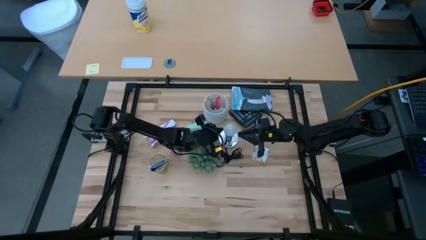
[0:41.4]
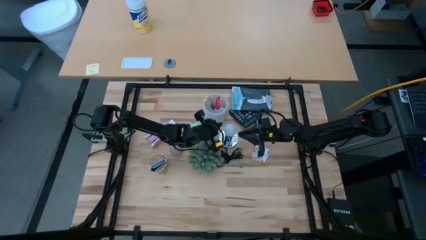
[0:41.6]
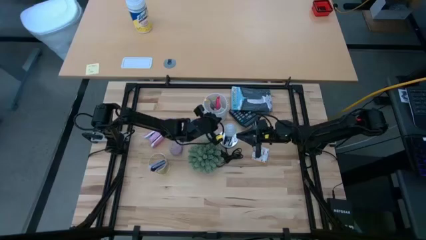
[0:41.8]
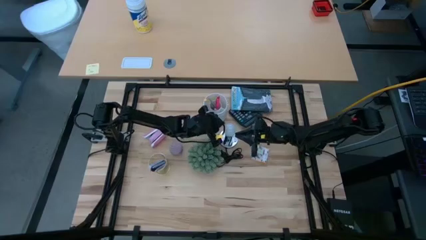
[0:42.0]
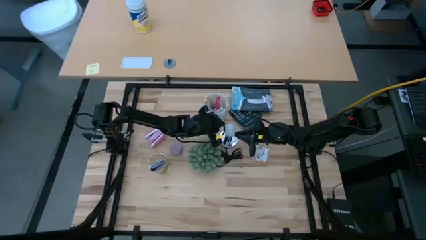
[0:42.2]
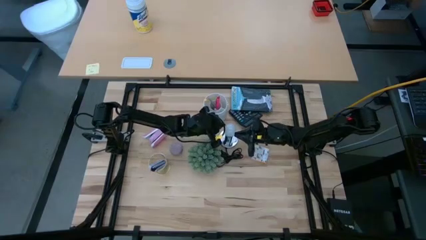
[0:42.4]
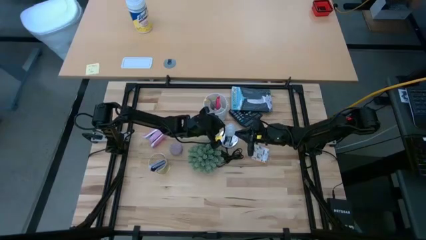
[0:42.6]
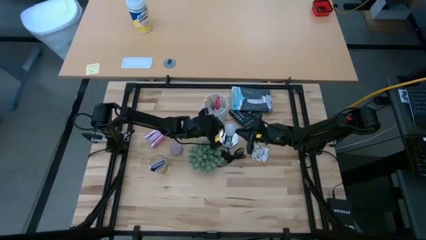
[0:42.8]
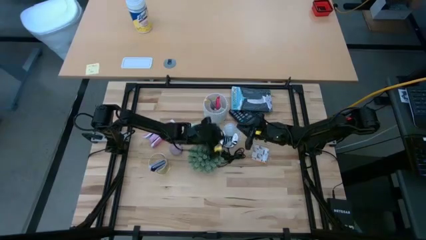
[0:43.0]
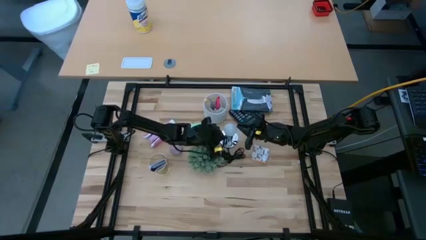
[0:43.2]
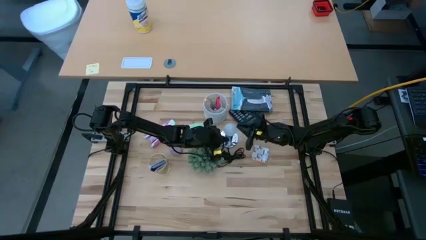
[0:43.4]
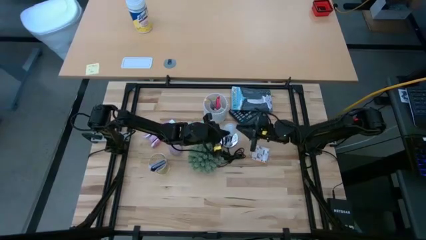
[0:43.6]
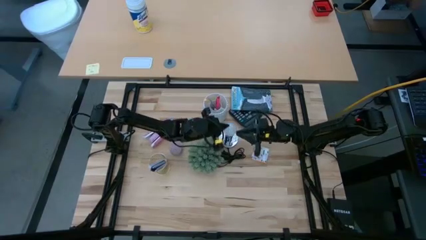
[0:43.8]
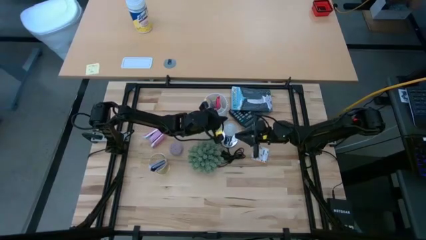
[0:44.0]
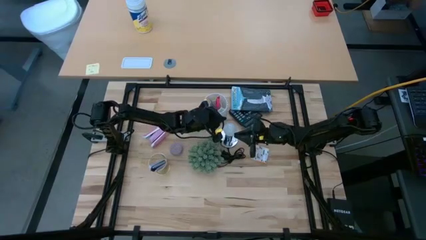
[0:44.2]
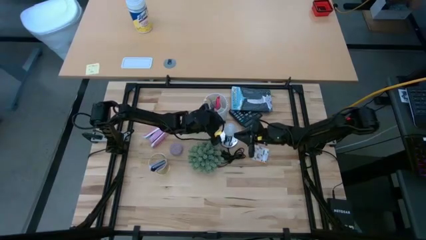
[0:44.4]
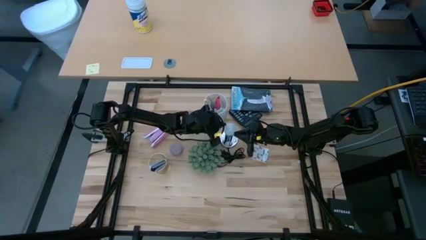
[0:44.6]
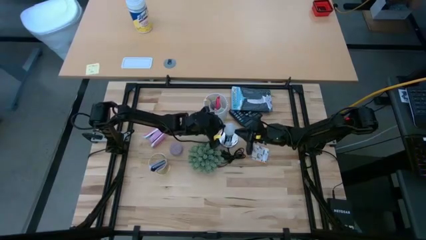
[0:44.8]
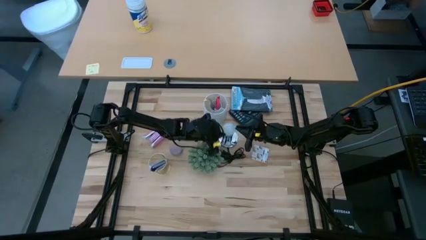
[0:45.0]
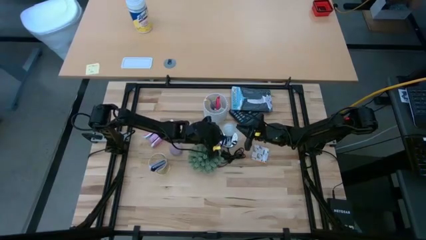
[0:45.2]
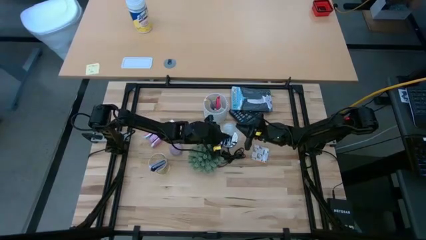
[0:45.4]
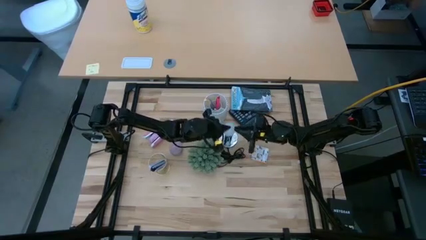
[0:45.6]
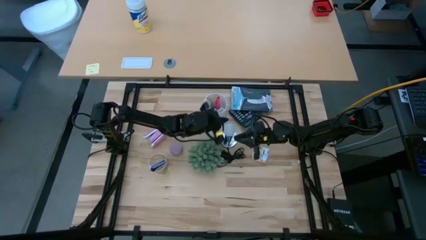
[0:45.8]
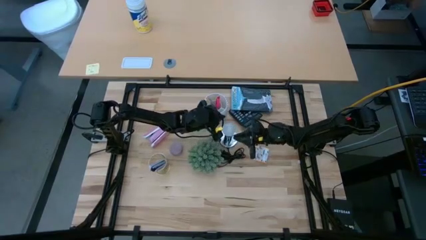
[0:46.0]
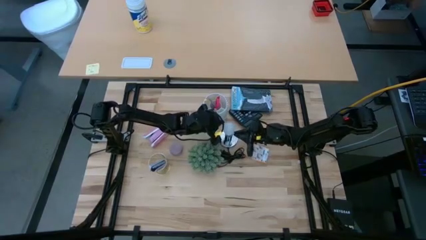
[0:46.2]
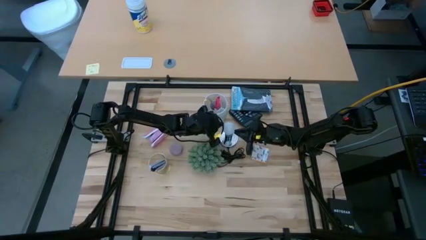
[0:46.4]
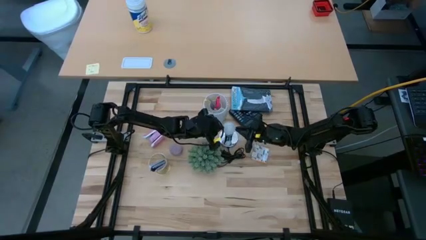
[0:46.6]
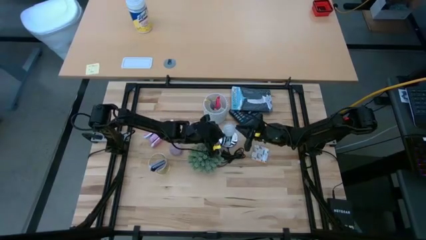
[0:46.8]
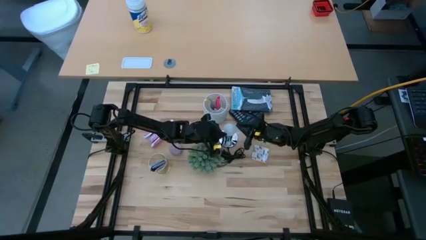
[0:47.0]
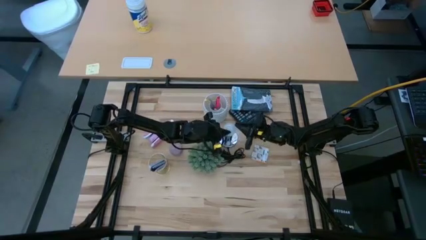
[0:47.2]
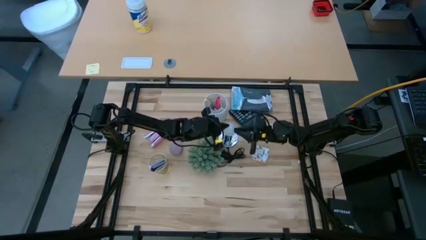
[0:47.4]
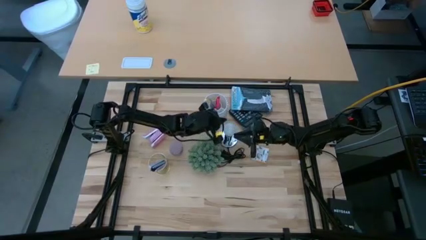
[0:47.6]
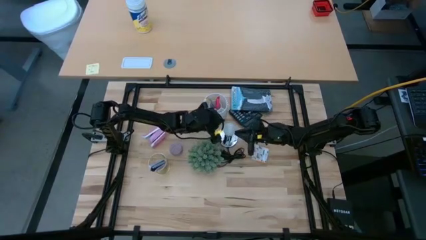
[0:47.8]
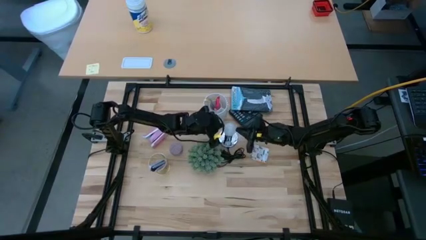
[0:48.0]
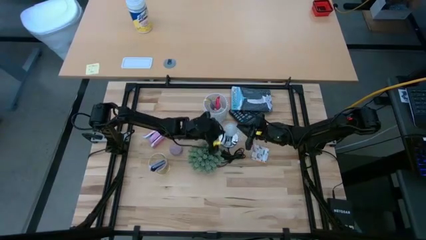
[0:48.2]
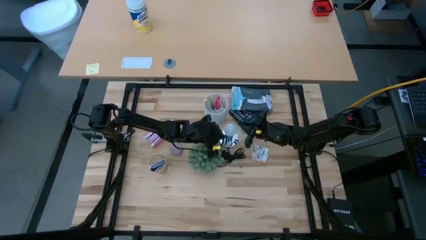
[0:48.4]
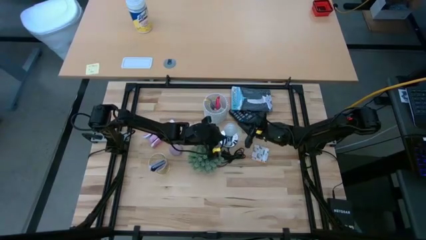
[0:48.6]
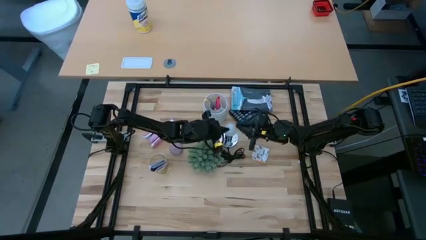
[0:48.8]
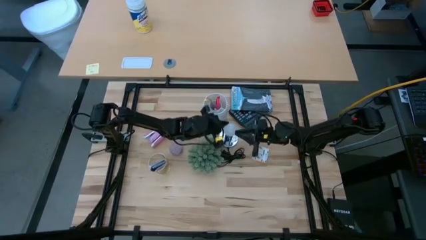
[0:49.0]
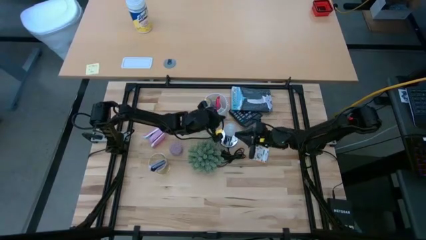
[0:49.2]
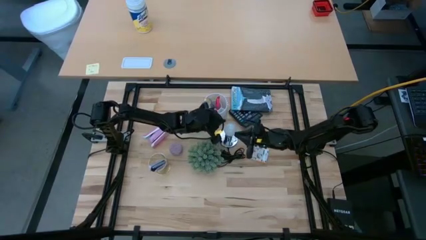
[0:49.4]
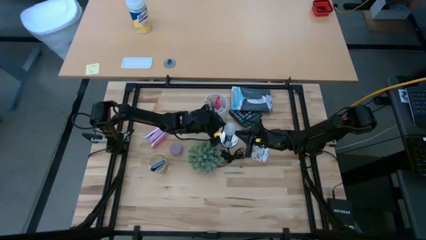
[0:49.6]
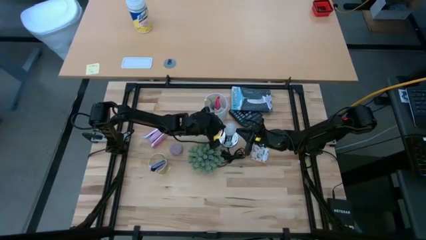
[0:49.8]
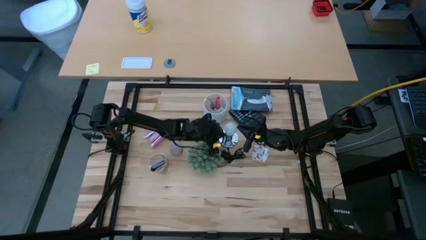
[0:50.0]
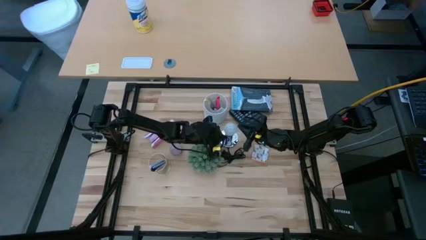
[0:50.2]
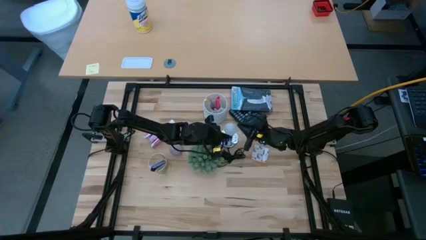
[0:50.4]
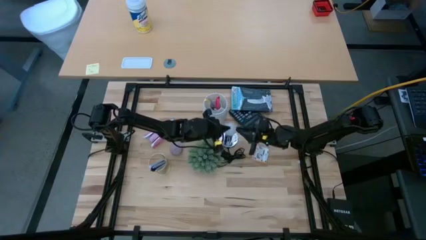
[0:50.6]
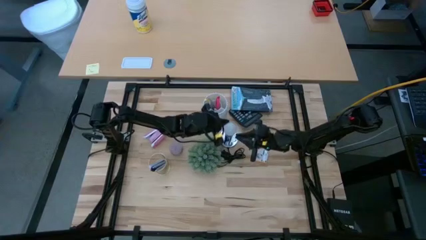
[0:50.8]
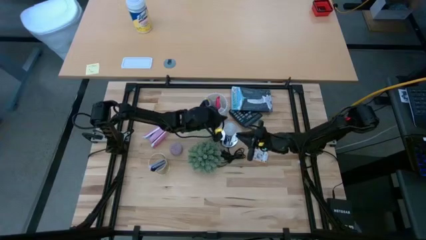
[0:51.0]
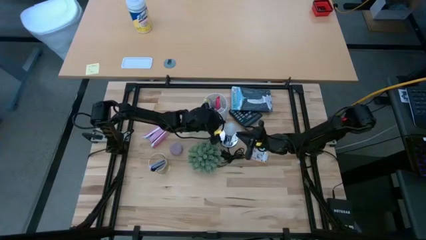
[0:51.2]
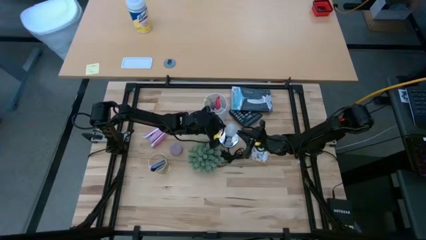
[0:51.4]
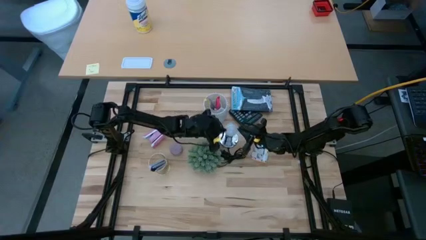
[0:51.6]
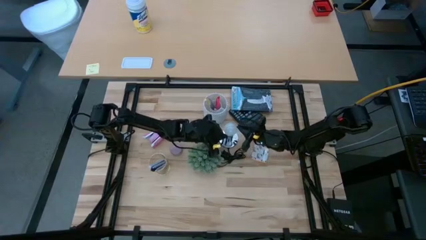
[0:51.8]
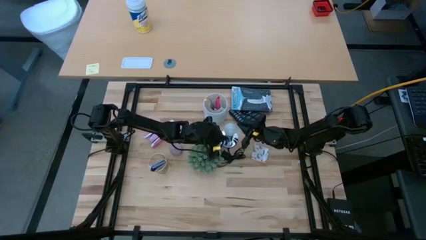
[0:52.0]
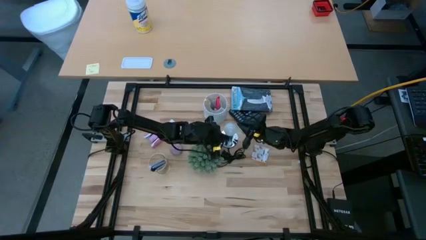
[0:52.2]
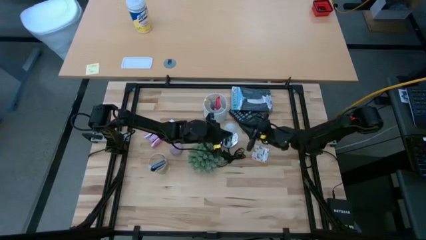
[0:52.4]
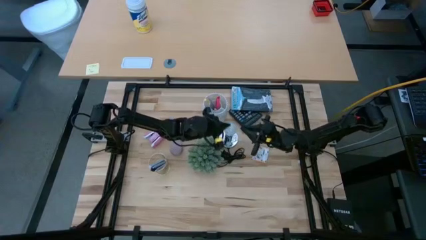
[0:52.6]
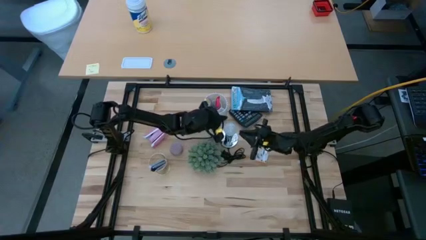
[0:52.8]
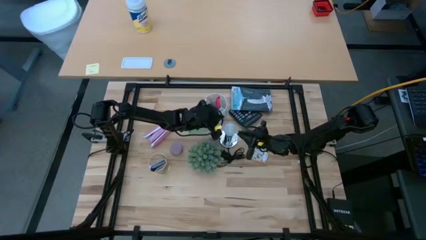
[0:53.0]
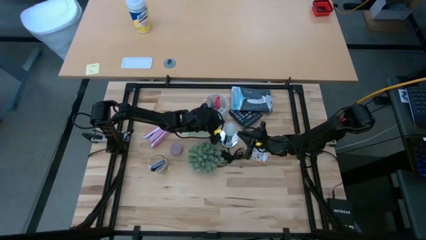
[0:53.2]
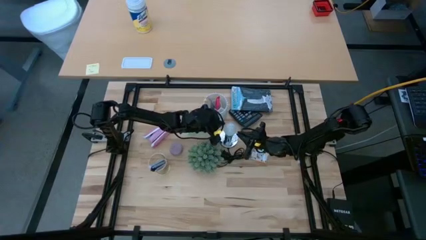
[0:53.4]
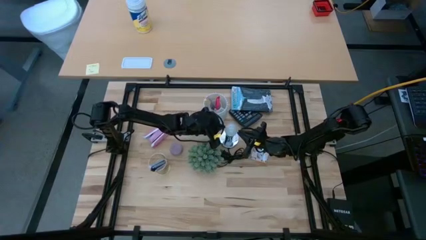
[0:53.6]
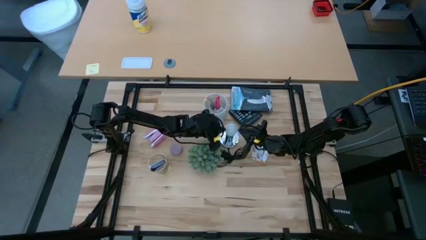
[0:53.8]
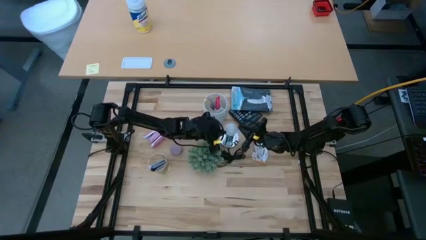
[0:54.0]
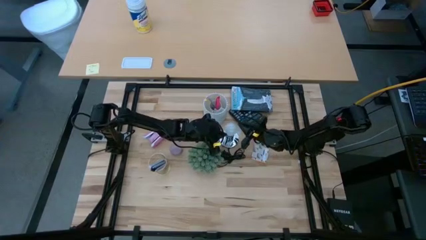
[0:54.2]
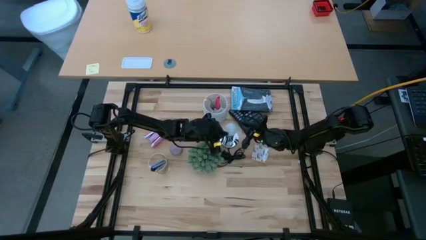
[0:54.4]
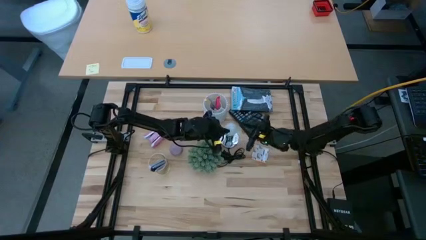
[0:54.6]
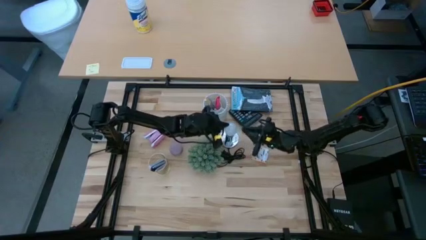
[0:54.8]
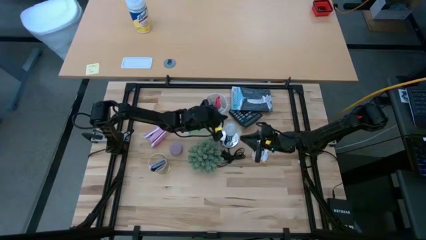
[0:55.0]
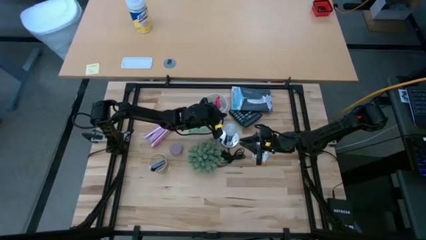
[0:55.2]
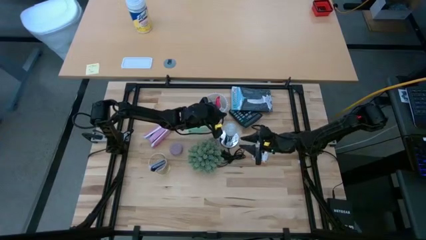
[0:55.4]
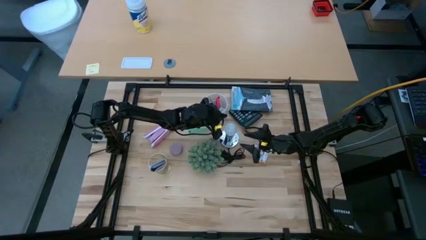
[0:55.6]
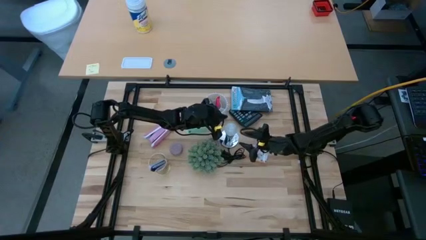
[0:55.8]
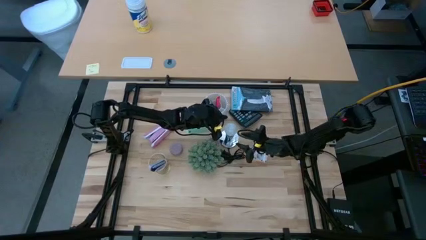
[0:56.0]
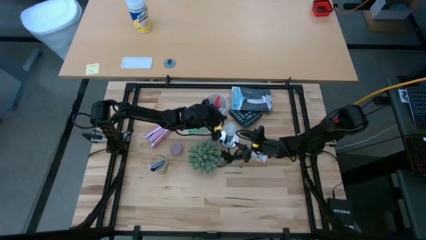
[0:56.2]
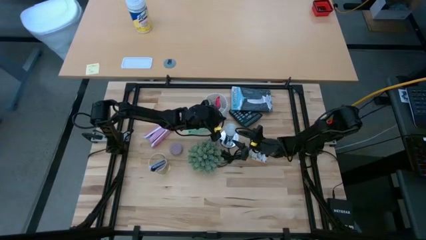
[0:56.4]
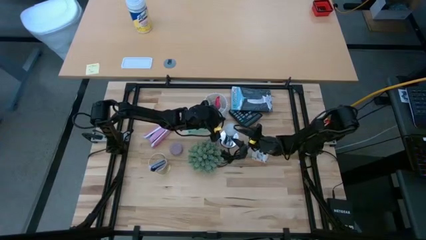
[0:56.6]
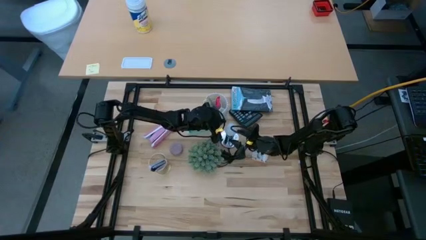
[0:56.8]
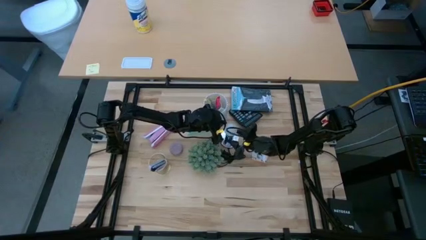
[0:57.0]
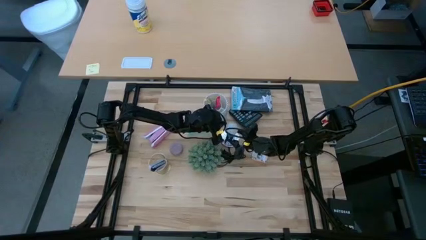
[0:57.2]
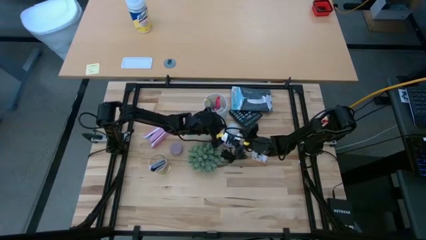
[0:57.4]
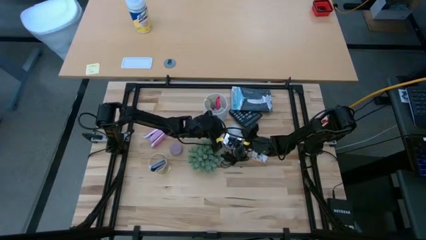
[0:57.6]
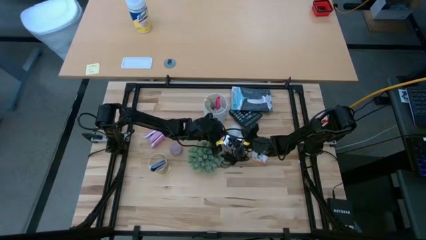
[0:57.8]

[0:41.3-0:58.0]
Task: Screw lightbulb
Remove the lightbulb from the silver desk lamp
